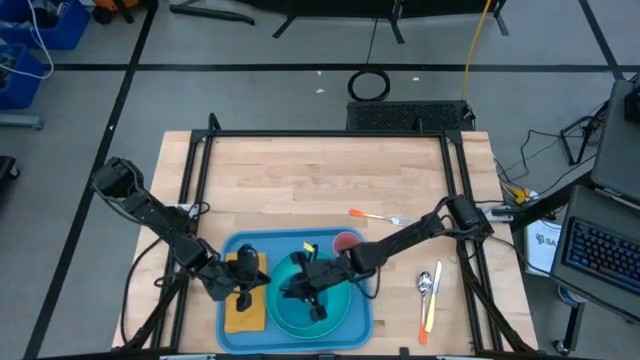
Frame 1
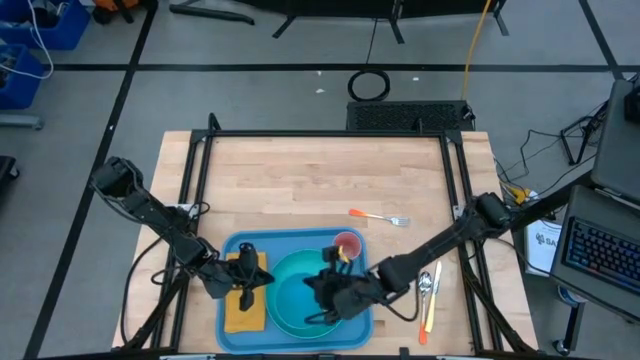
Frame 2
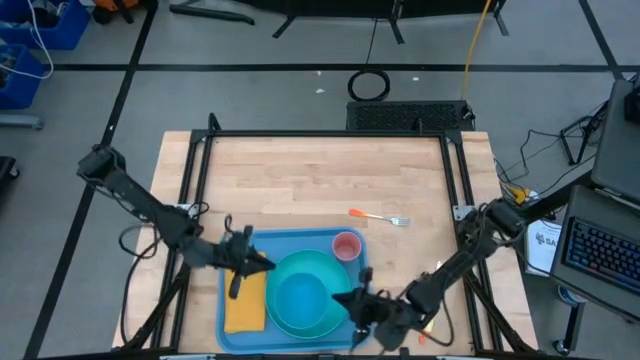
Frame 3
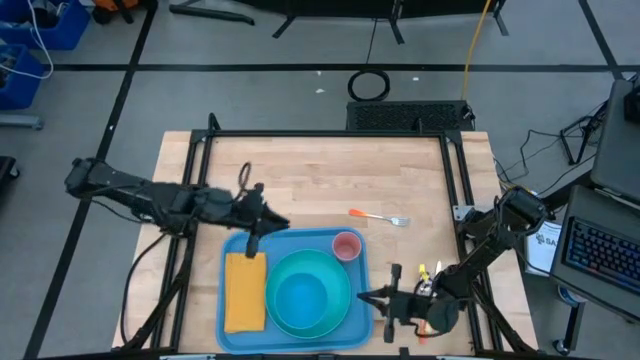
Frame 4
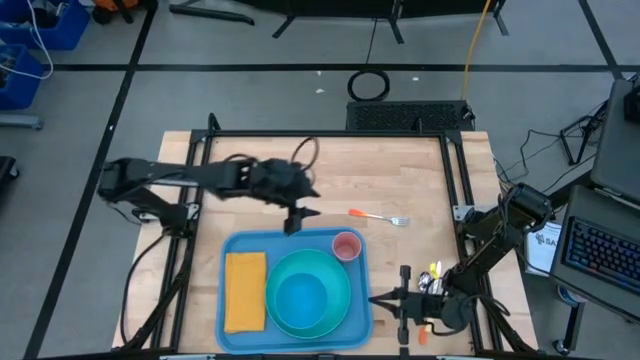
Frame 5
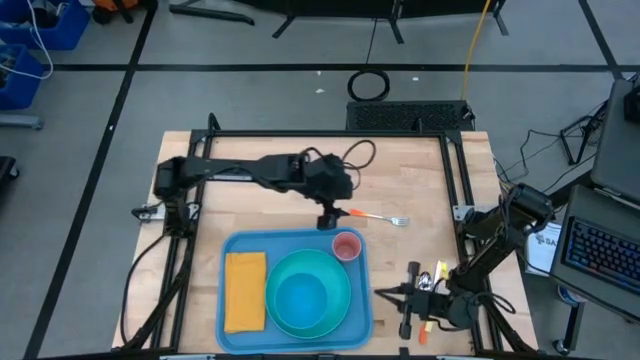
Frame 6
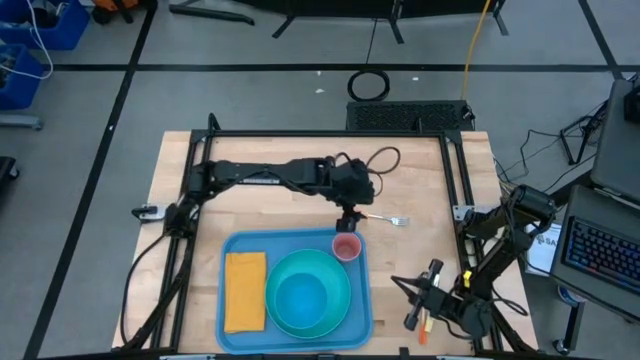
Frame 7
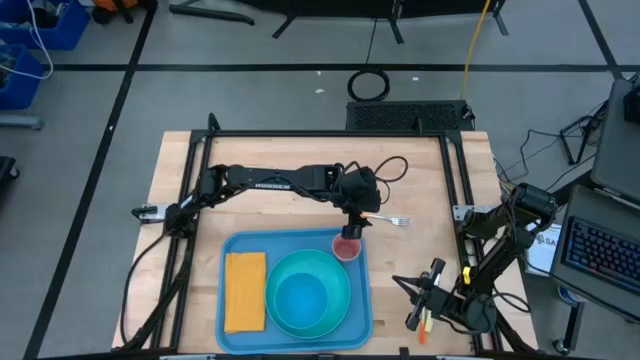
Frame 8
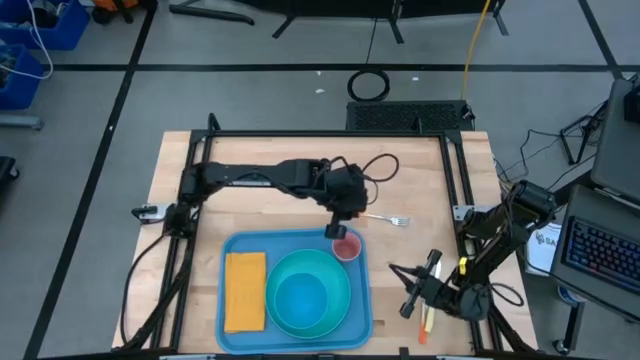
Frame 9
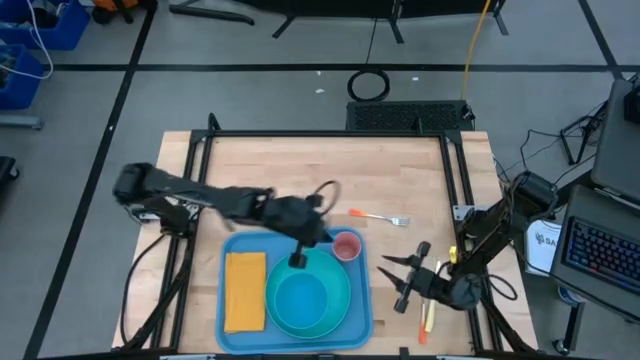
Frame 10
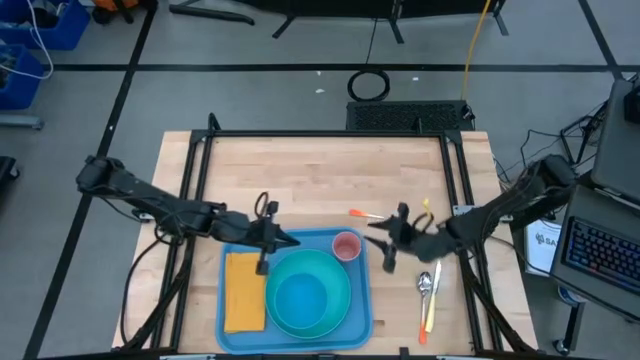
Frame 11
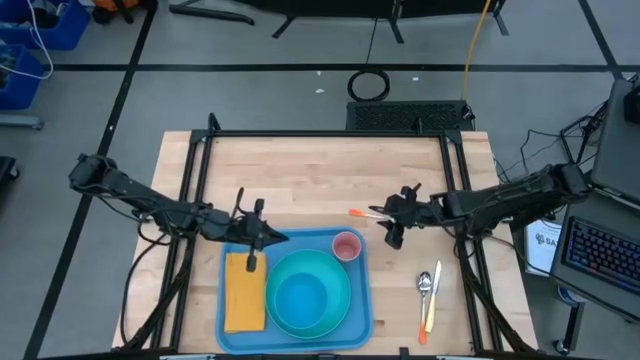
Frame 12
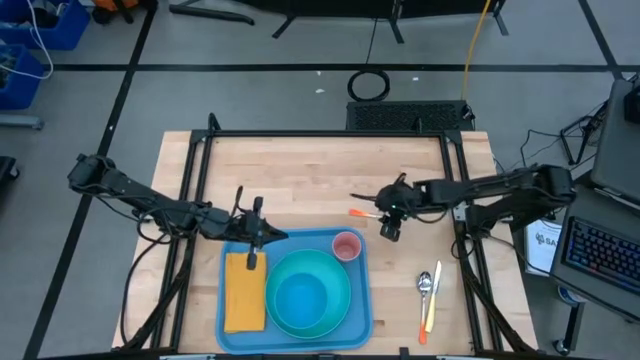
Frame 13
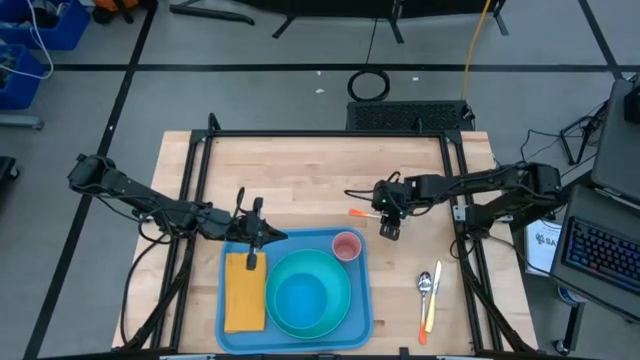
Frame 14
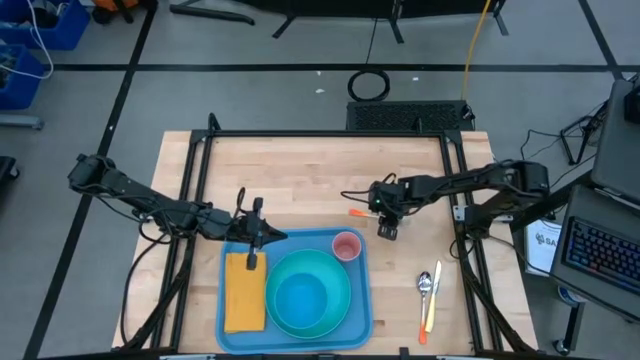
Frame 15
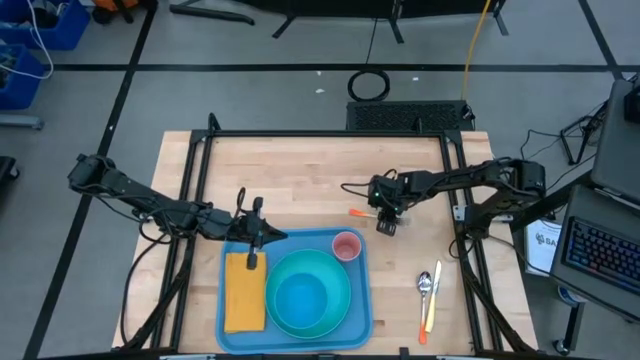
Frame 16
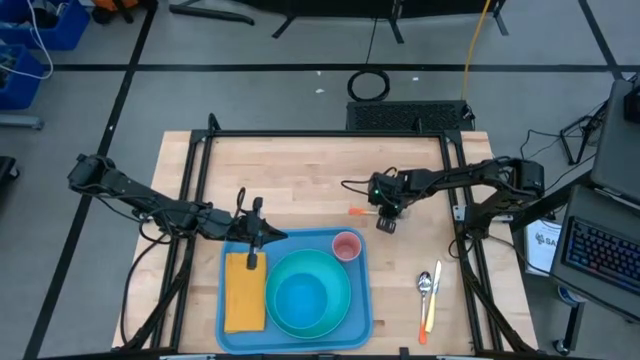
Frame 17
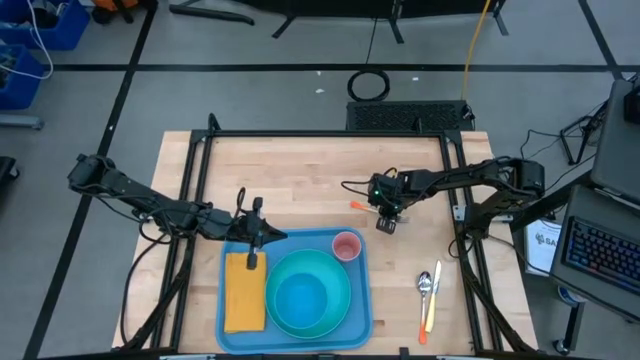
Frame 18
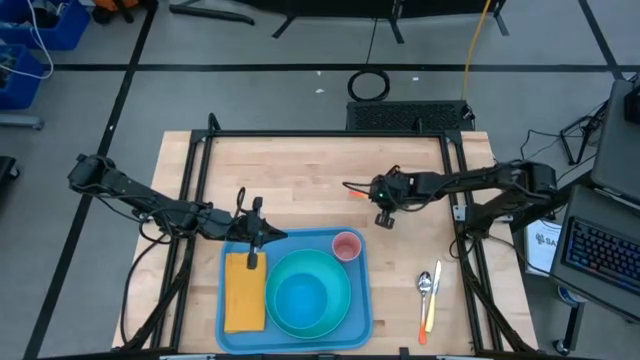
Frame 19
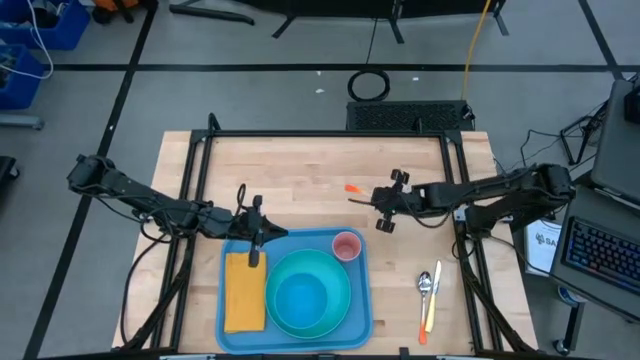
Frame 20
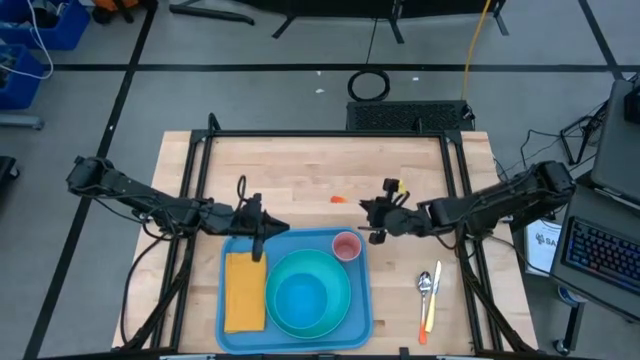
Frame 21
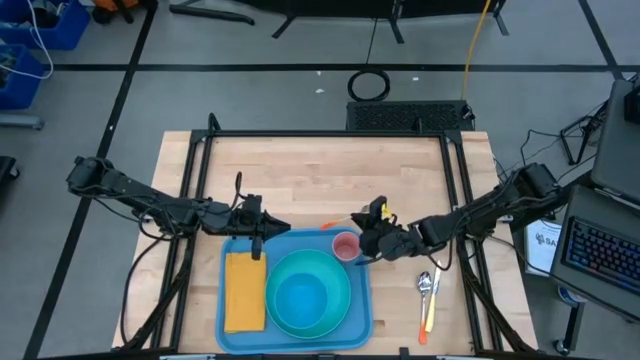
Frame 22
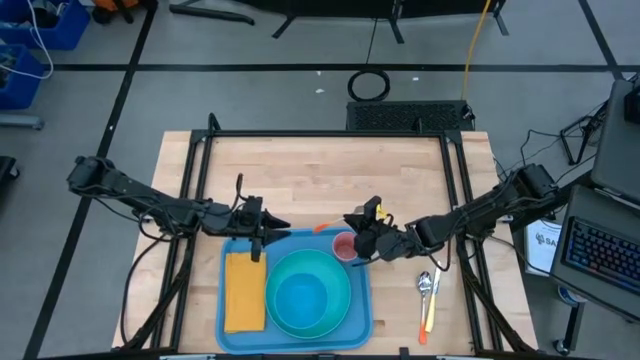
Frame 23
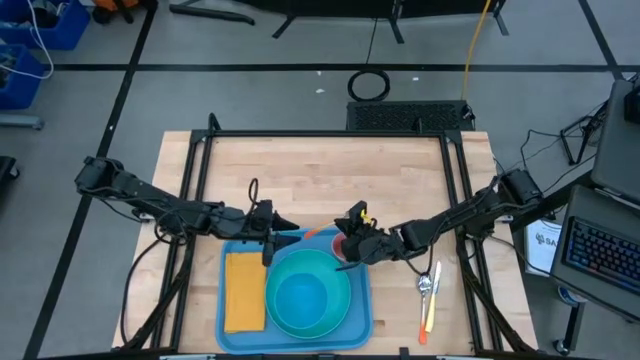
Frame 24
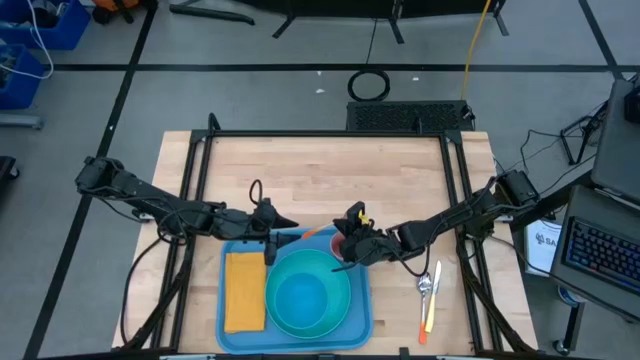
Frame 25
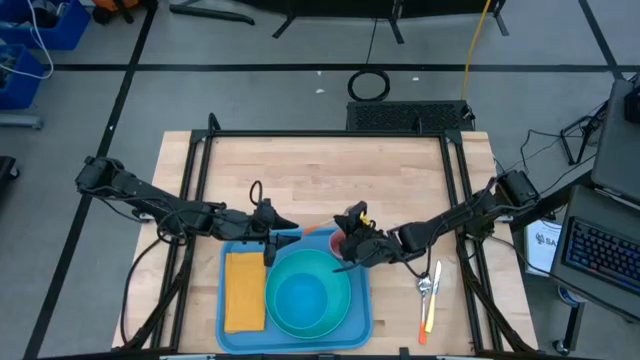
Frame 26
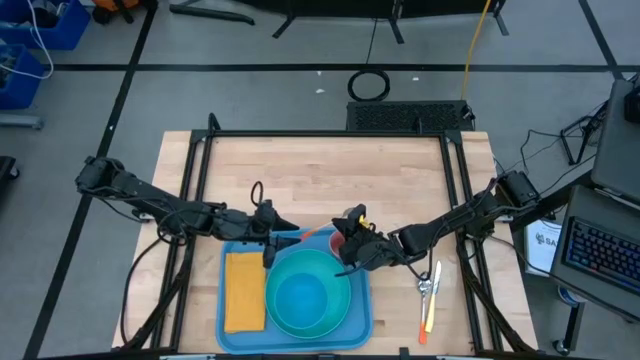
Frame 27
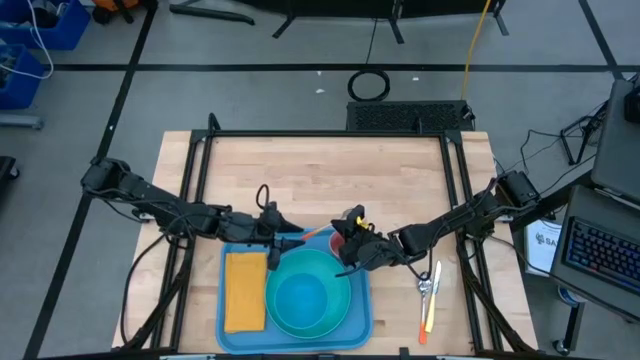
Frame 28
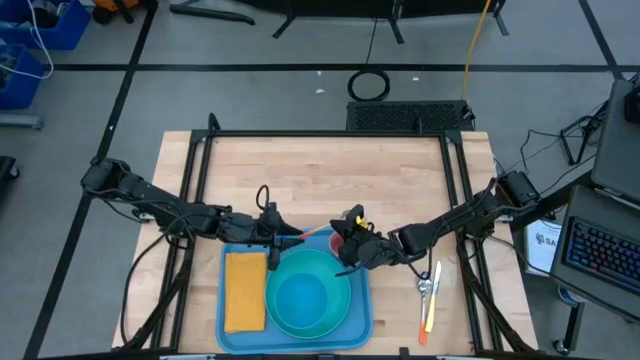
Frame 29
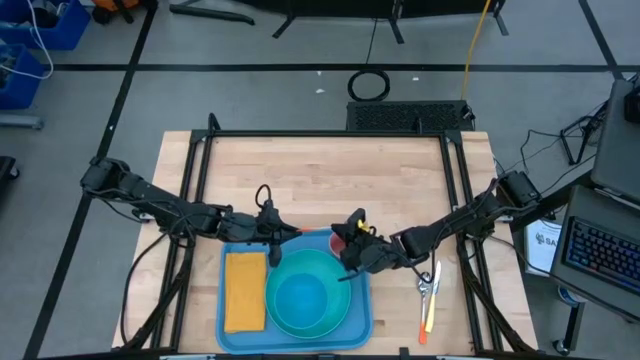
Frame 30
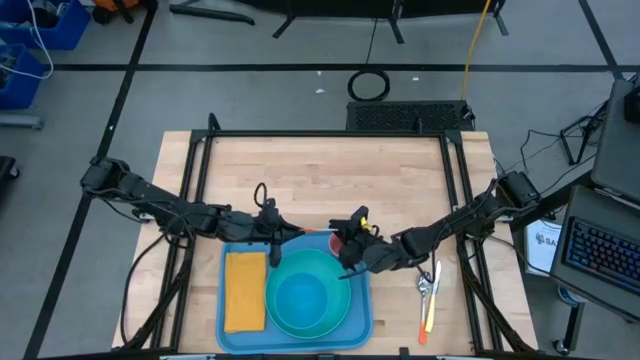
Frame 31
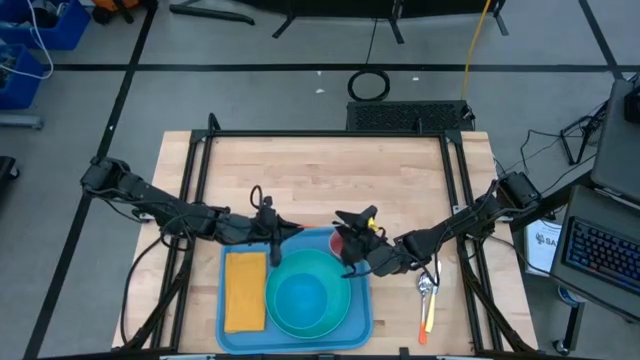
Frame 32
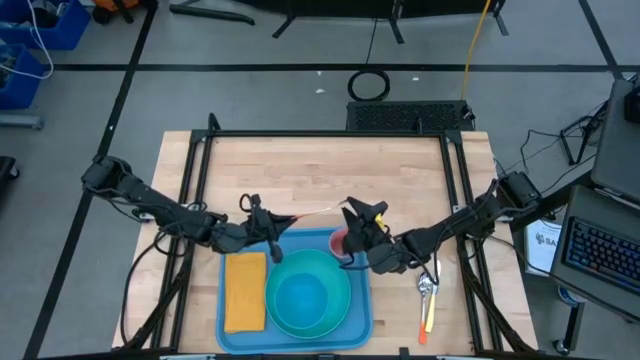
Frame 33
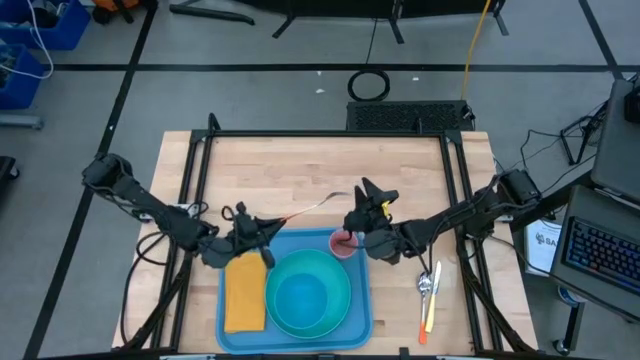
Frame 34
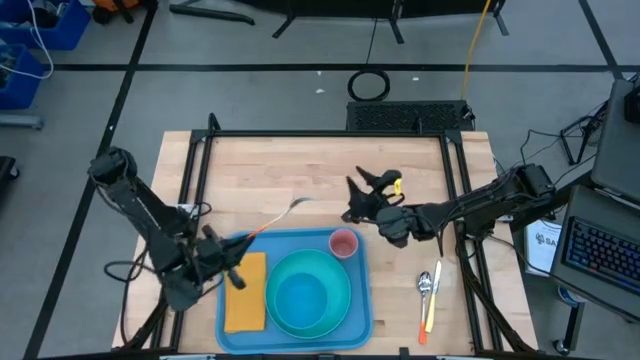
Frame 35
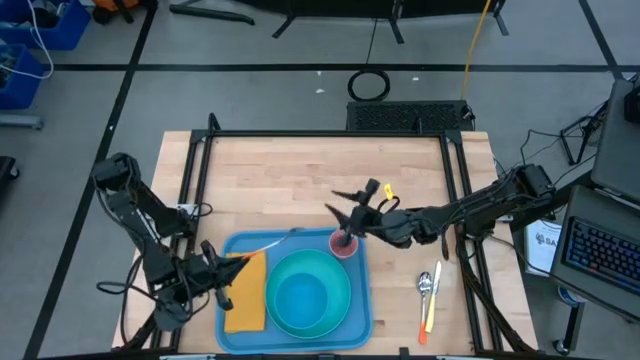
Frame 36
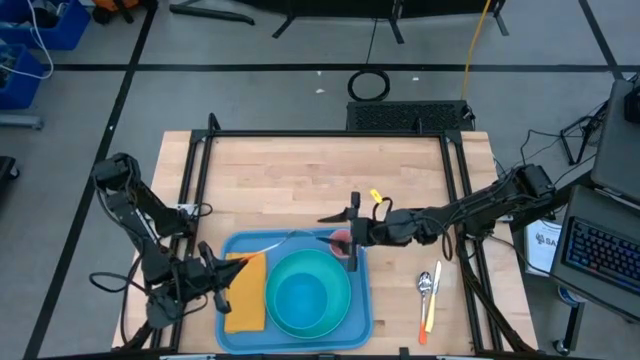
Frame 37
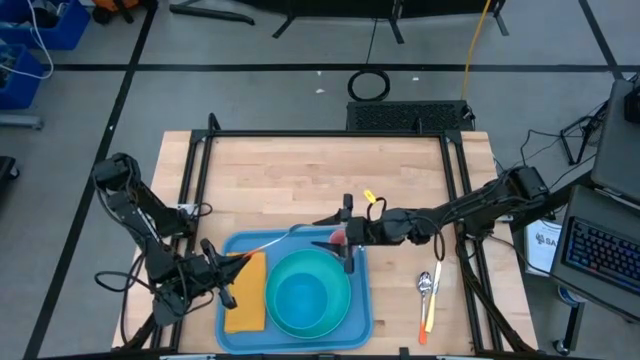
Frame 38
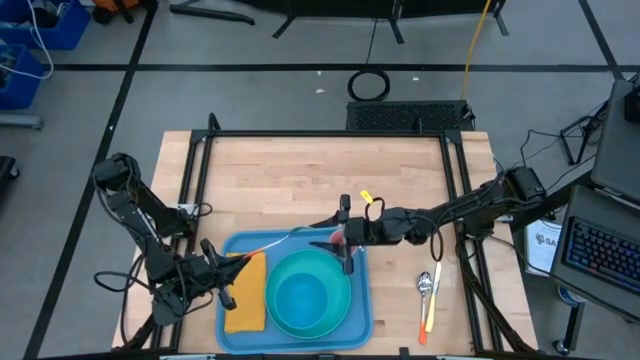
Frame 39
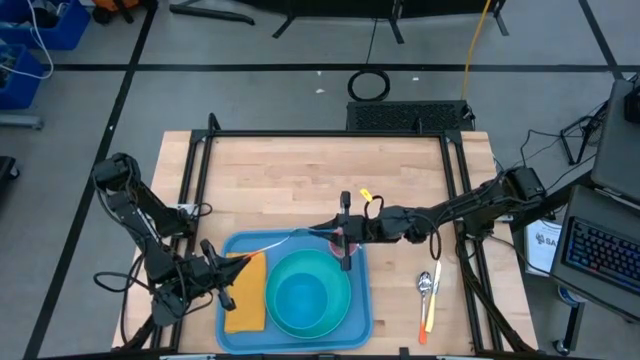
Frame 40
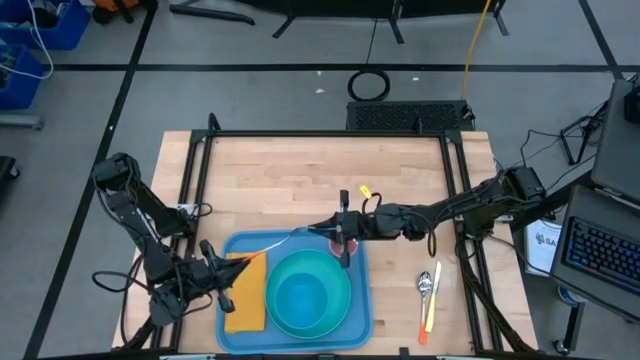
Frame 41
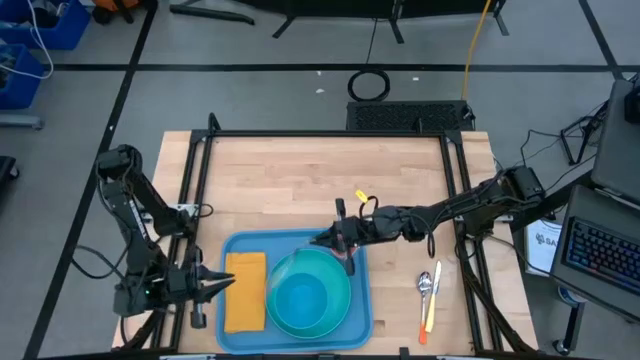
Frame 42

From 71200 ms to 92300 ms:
Task: Set up tray
Put the orange fork on the yellow table napkin
